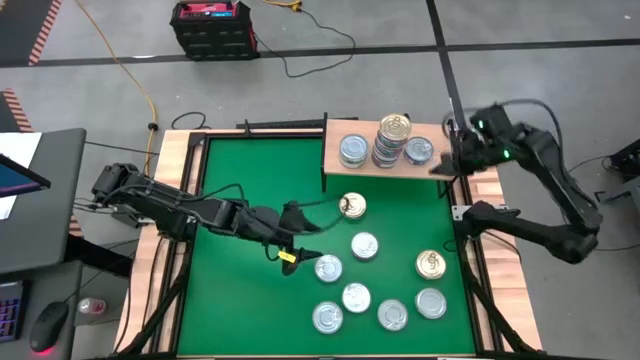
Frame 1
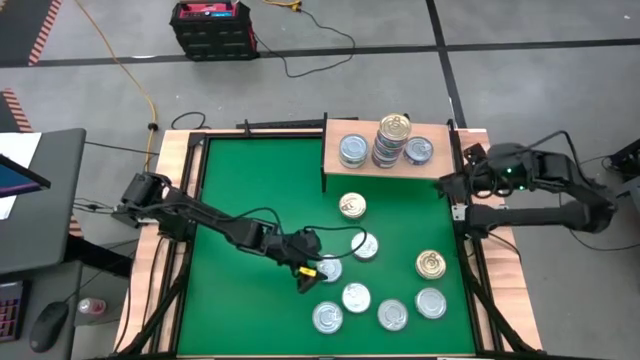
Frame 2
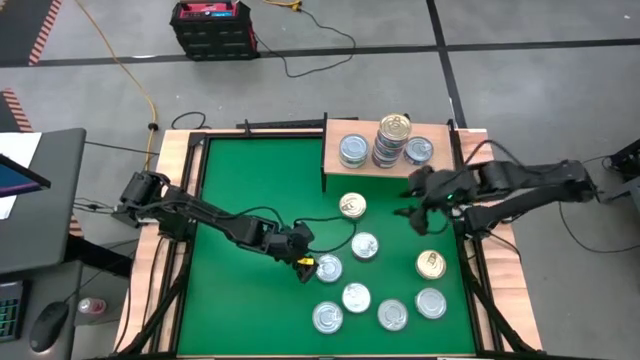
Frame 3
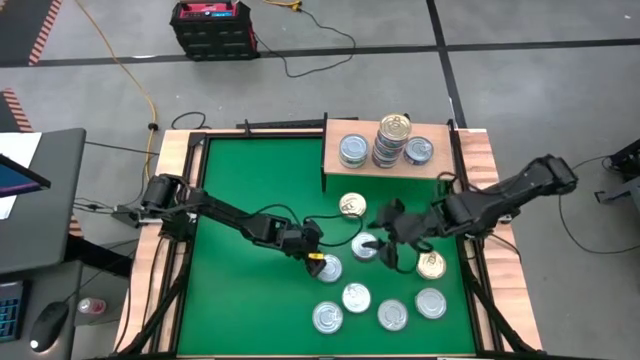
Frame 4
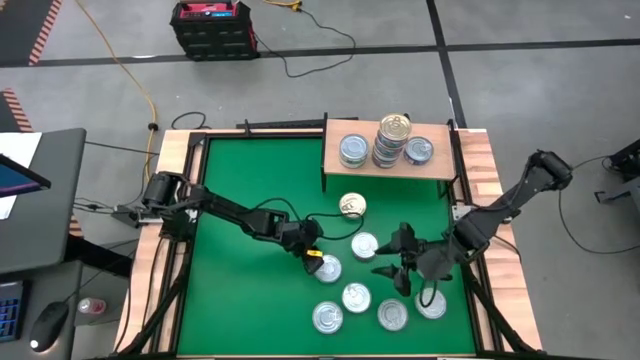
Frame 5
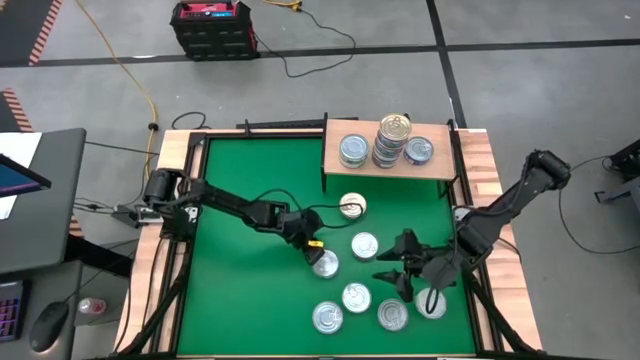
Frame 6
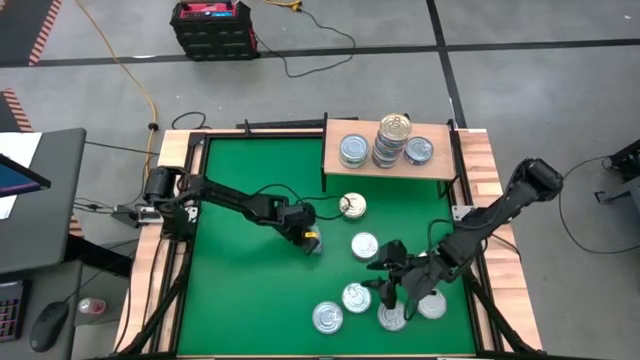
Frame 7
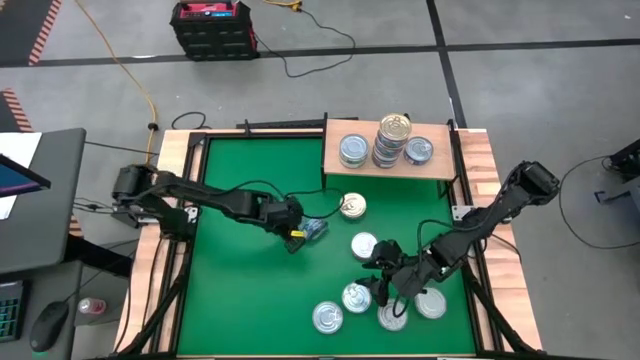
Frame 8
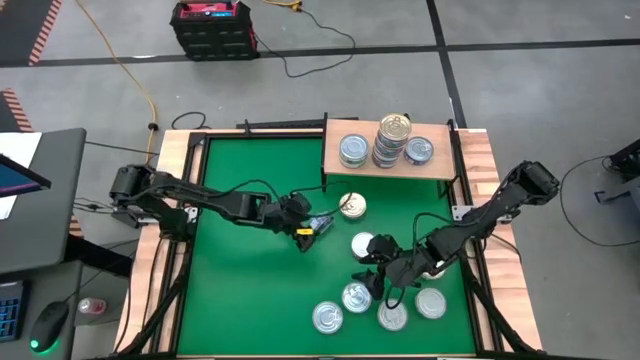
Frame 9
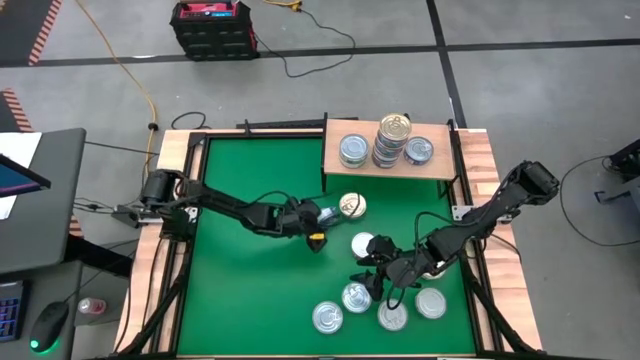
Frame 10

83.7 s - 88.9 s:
Task: Stack canned seafood by type on shelf
Stack the blue tuna can on top of the blue tuna can

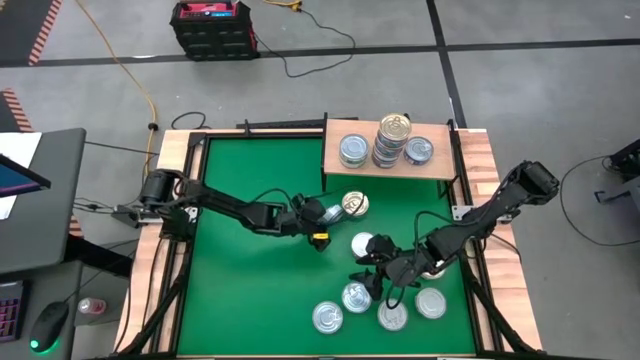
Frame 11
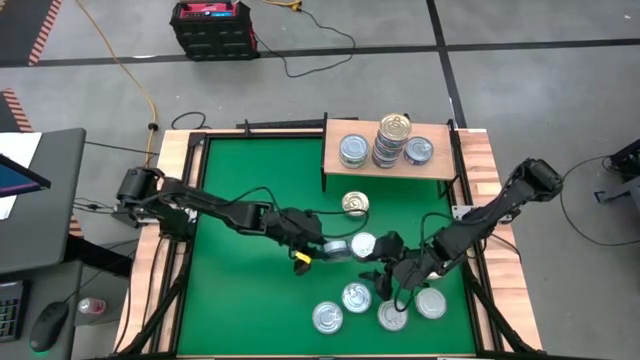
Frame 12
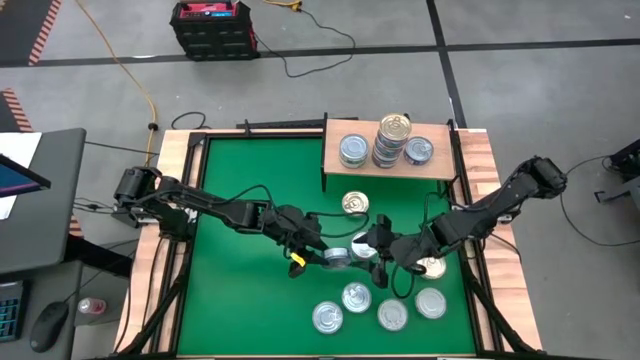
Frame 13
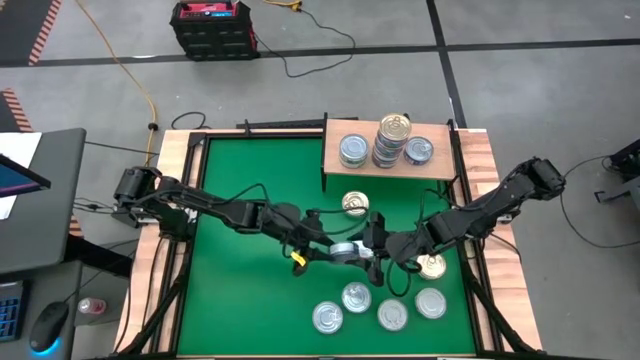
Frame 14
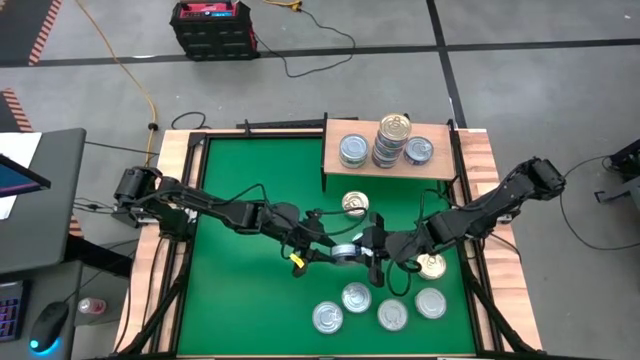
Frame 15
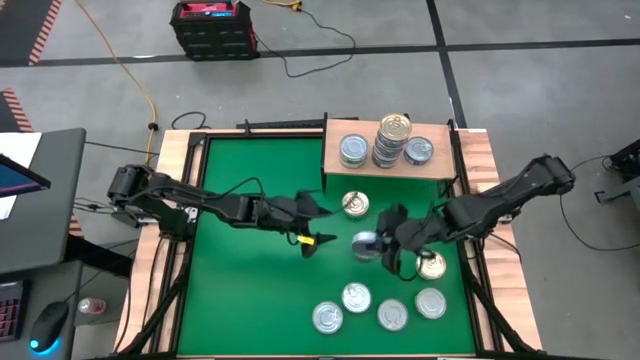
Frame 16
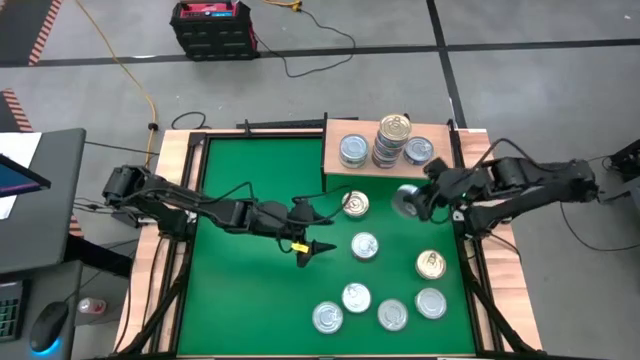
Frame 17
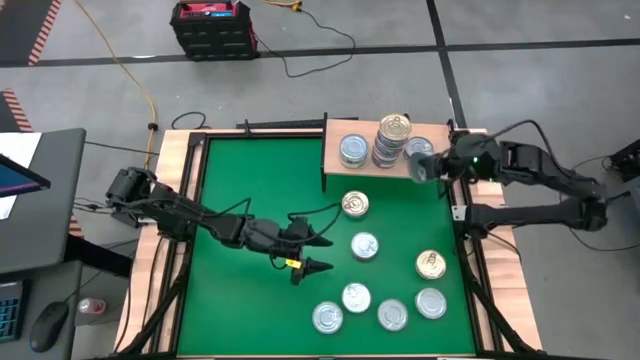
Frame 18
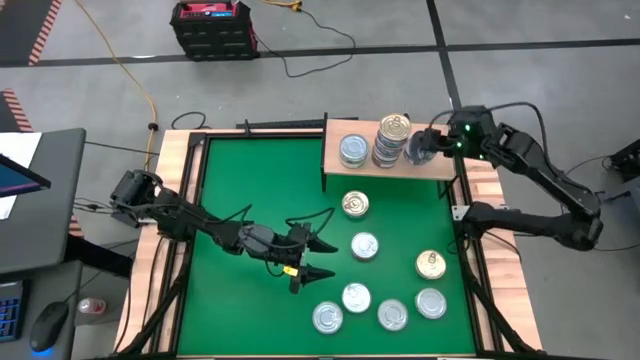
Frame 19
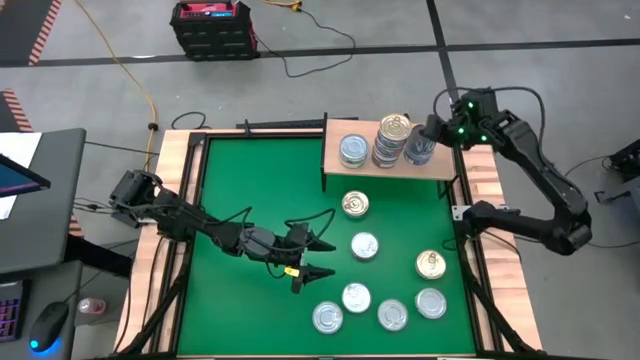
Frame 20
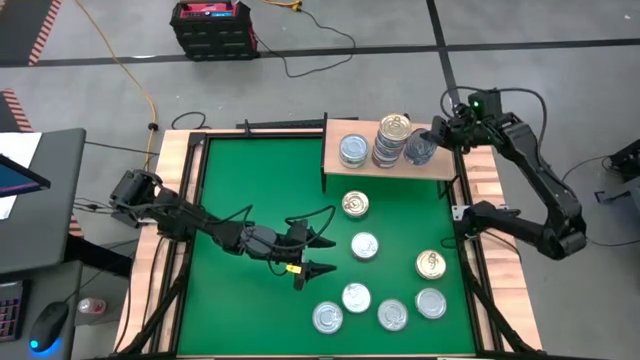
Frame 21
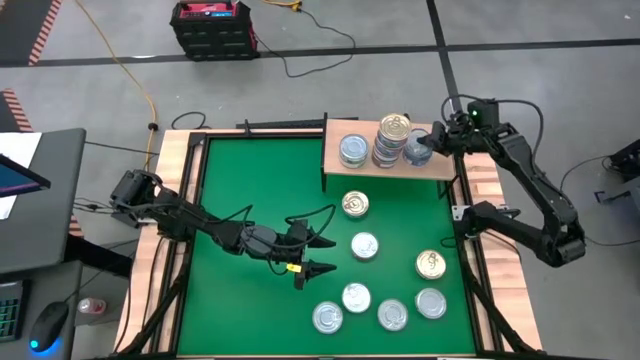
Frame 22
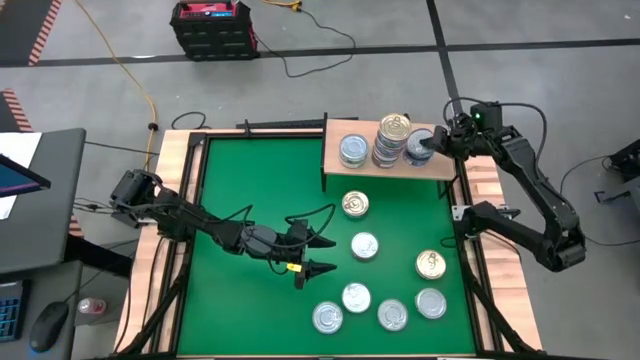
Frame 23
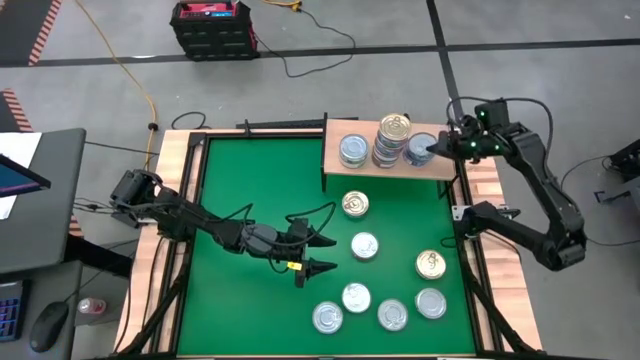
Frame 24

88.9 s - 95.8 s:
Stack the blue tuna can on top of the blue tuna can

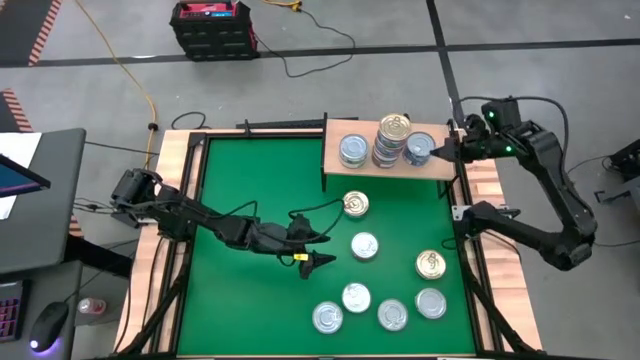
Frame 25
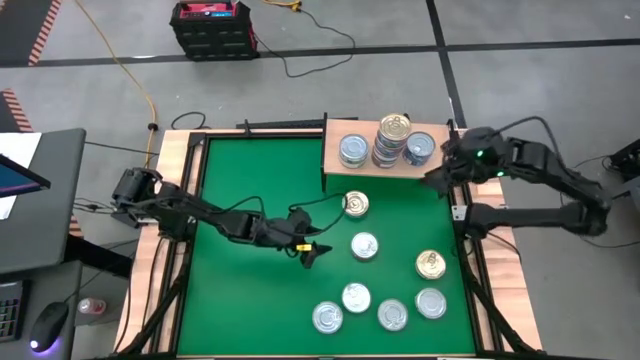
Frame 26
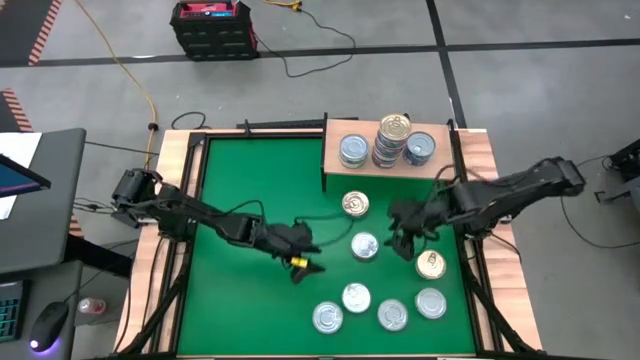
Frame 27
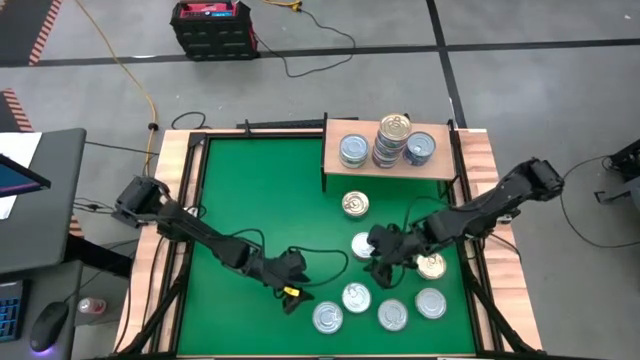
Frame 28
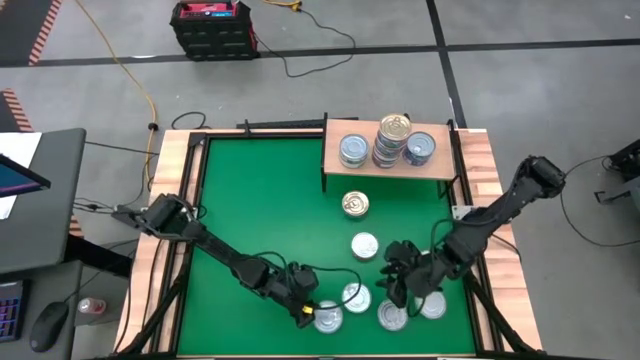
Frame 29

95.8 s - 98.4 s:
Put the green tuna can on the shelf

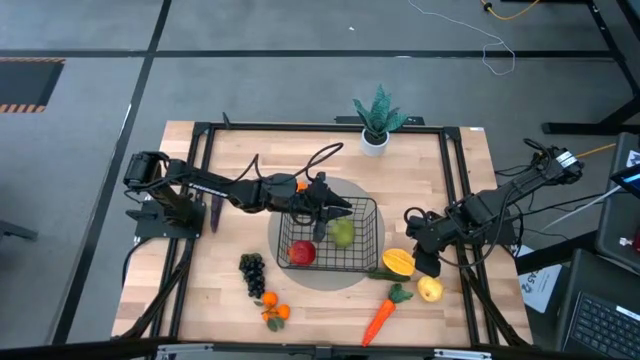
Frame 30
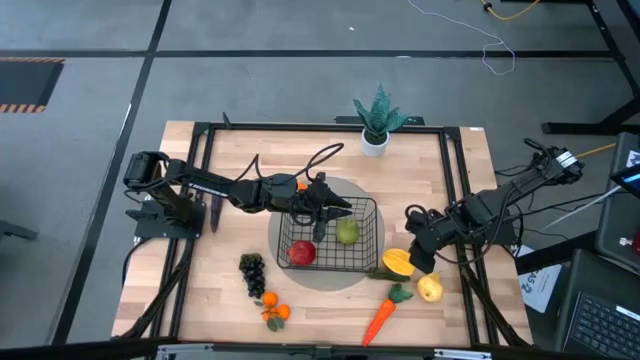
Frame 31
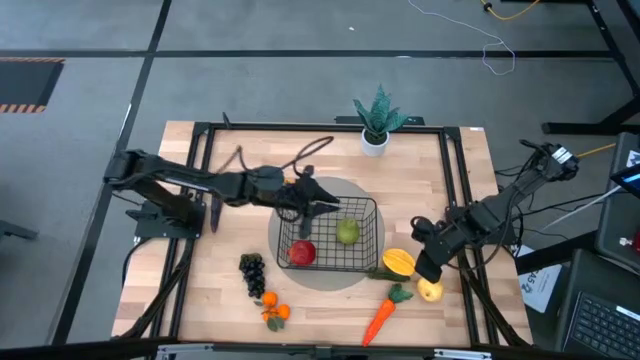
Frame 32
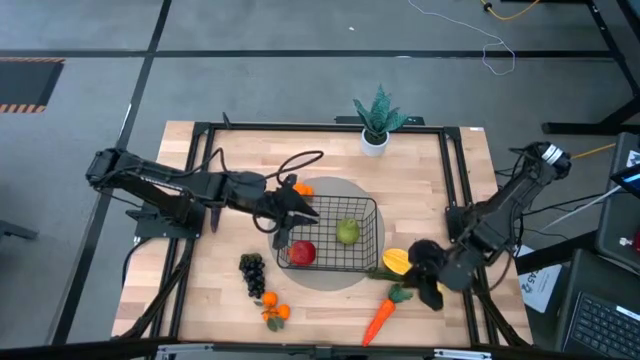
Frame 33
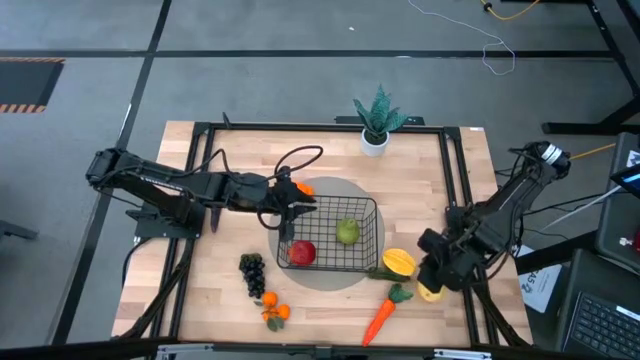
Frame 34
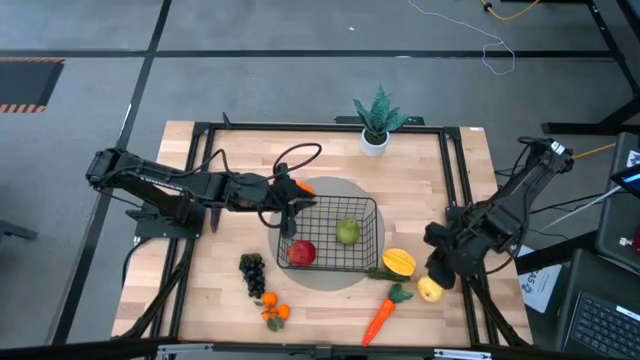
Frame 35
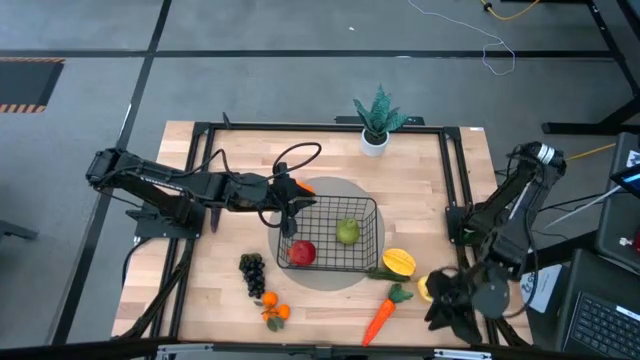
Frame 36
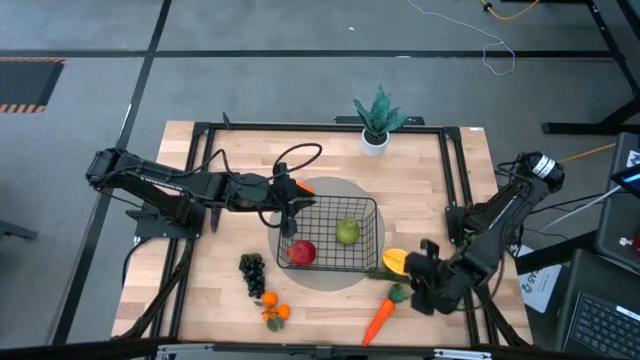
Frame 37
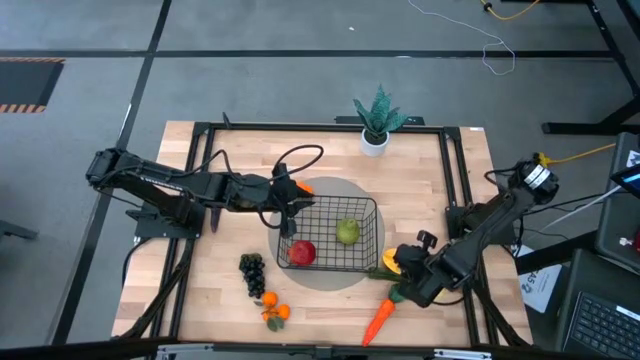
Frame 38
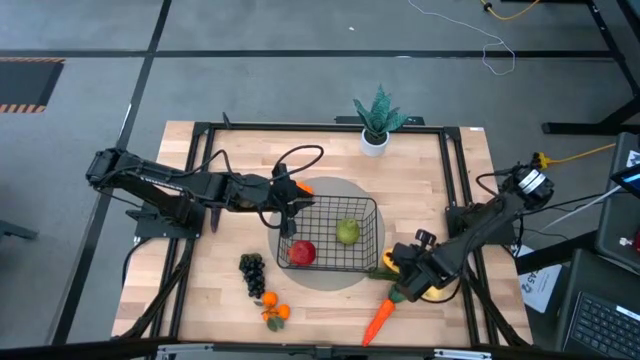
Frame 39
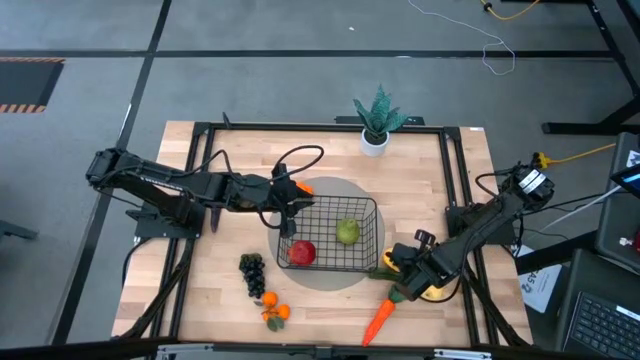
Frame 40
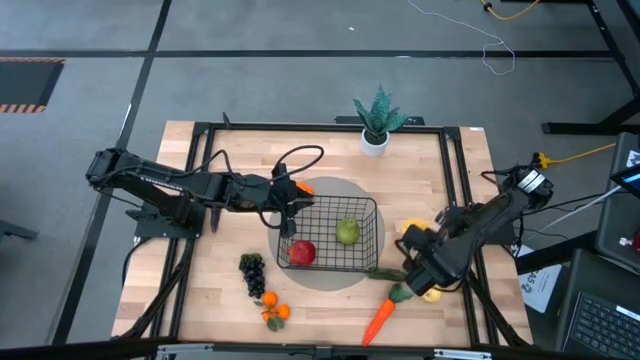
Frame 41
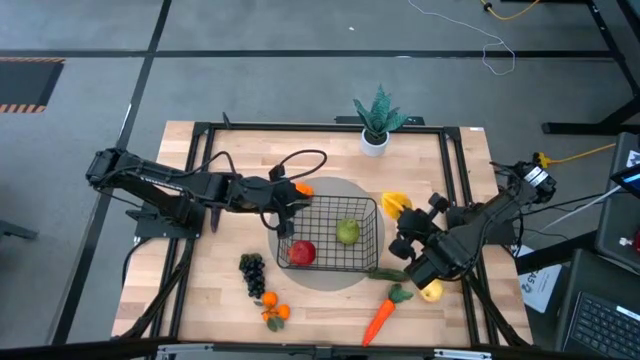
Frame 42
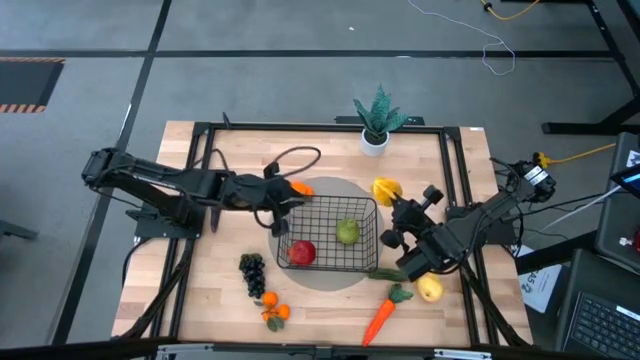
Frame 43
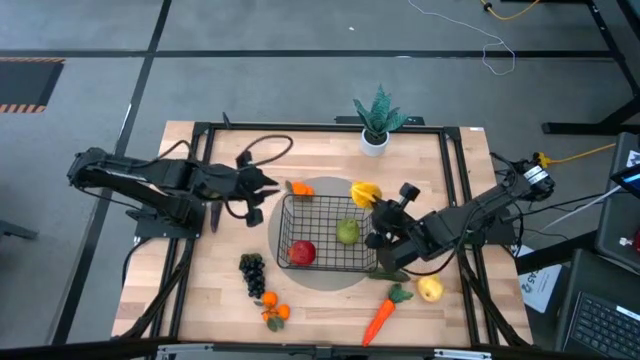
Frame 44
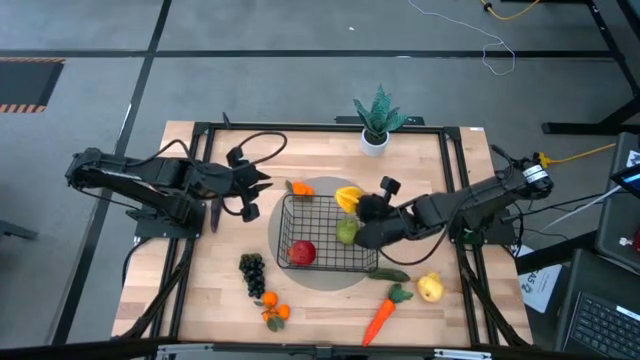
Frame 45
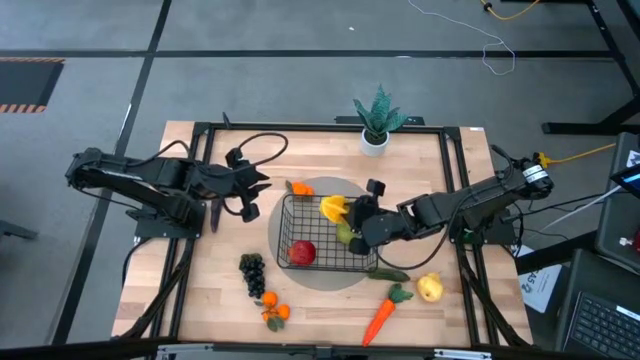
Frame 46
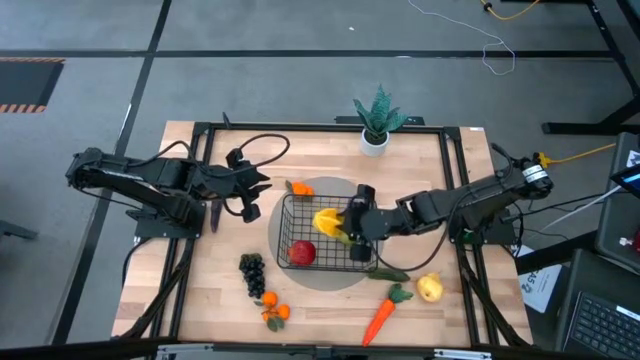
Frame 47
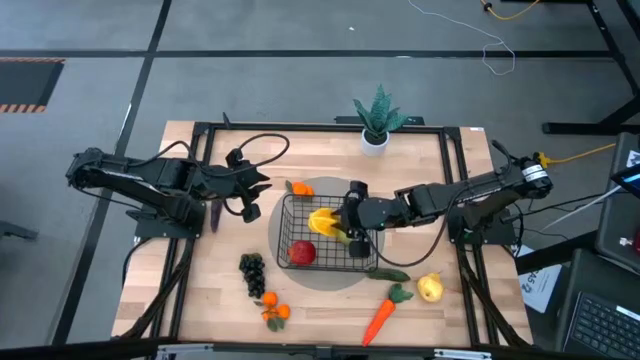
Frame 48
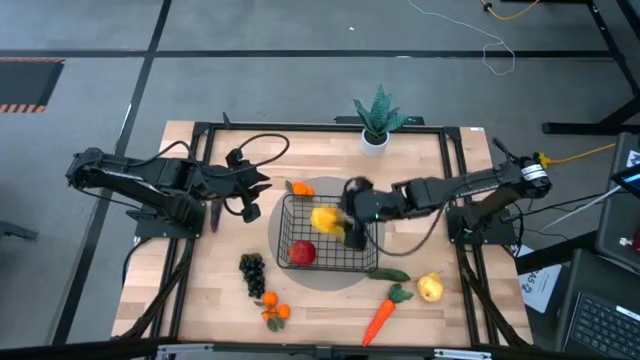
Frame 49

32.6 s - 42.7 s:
Task: Build produce basket
Put the starfruit into the black wire basket
